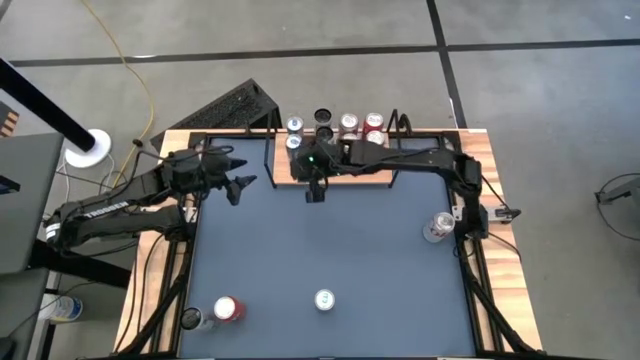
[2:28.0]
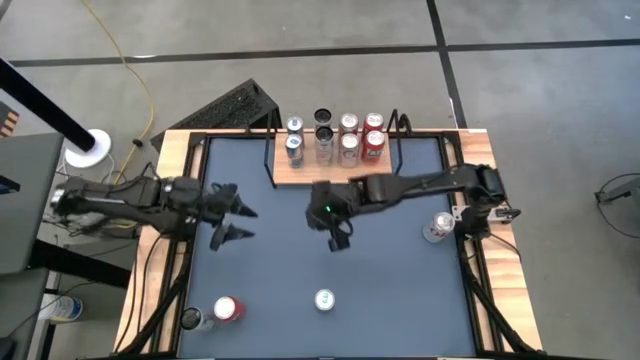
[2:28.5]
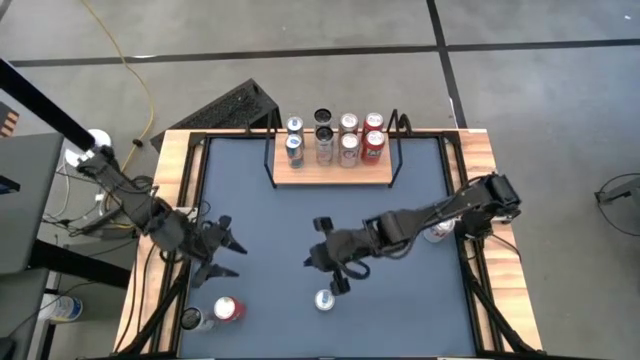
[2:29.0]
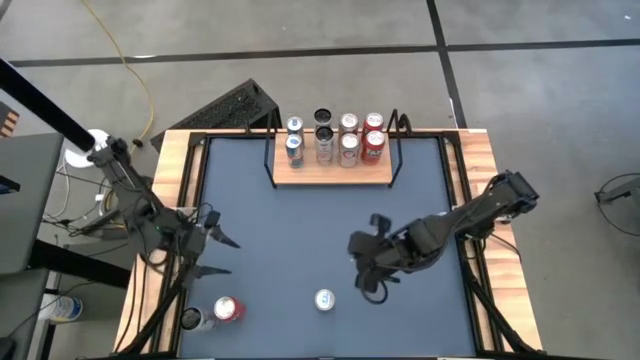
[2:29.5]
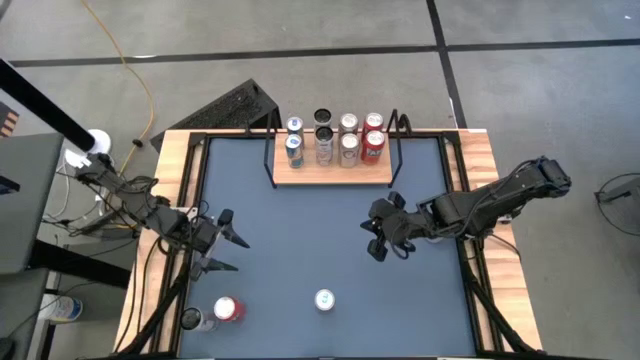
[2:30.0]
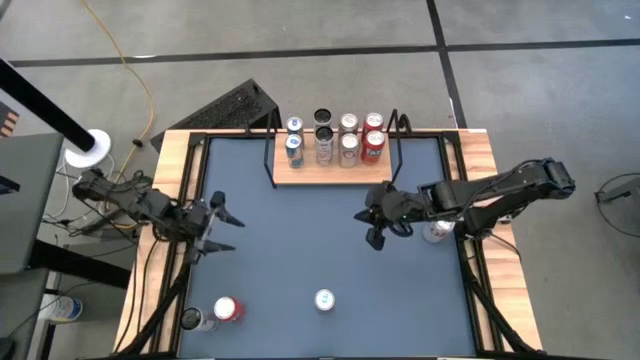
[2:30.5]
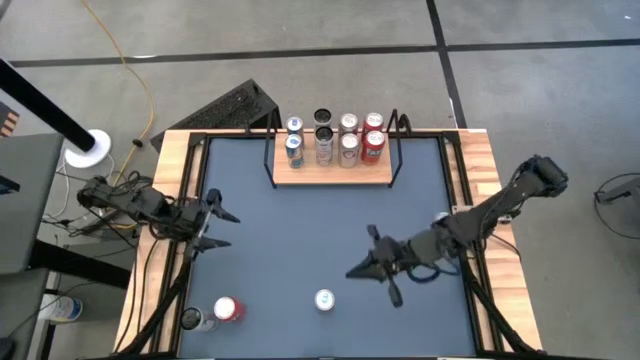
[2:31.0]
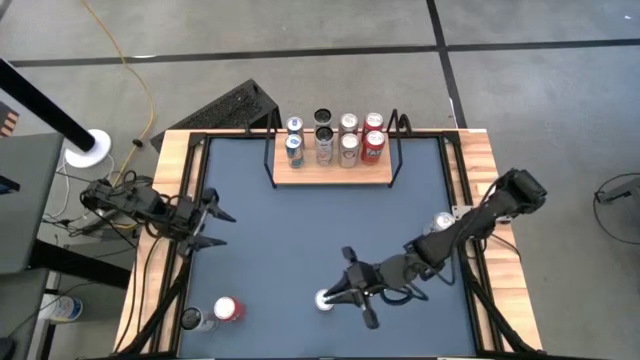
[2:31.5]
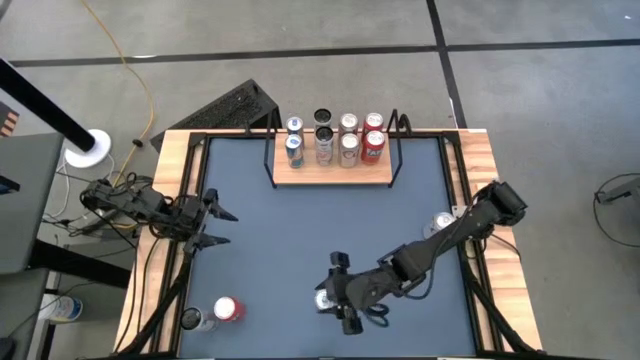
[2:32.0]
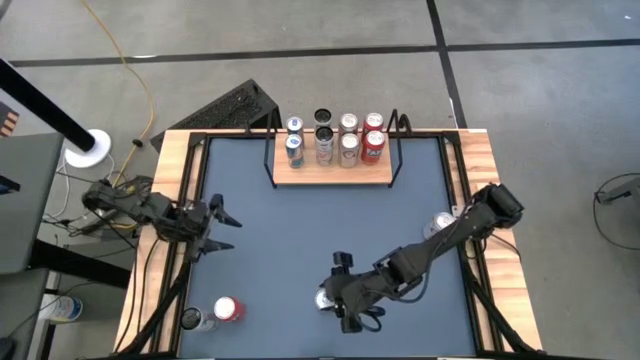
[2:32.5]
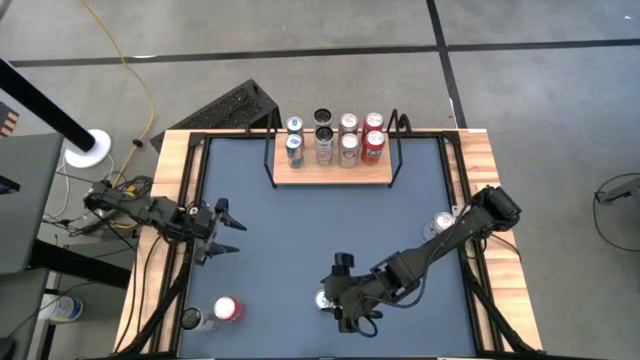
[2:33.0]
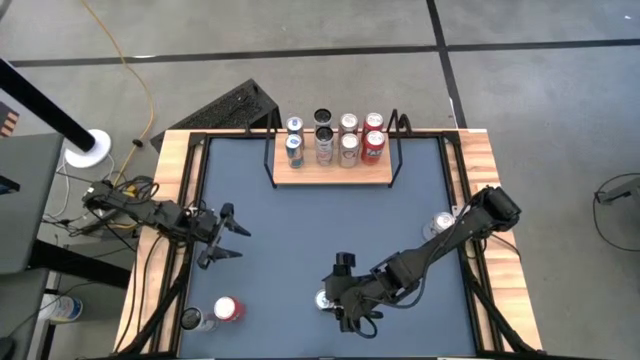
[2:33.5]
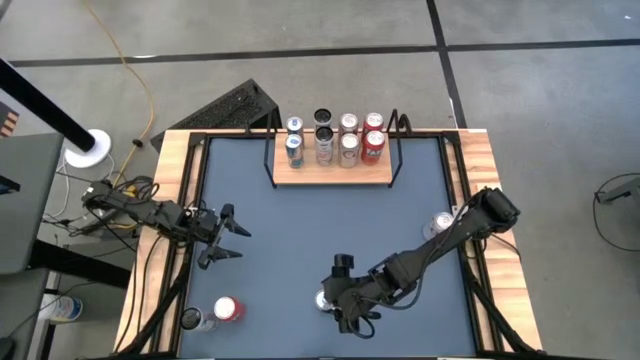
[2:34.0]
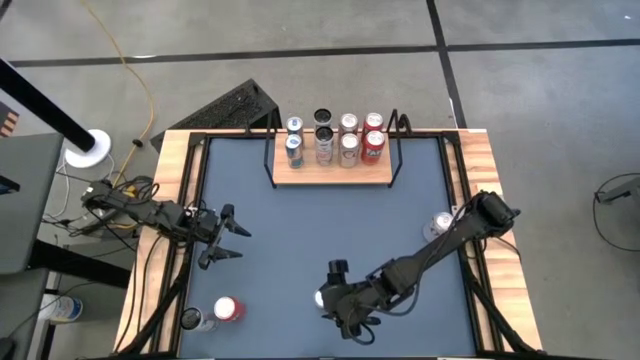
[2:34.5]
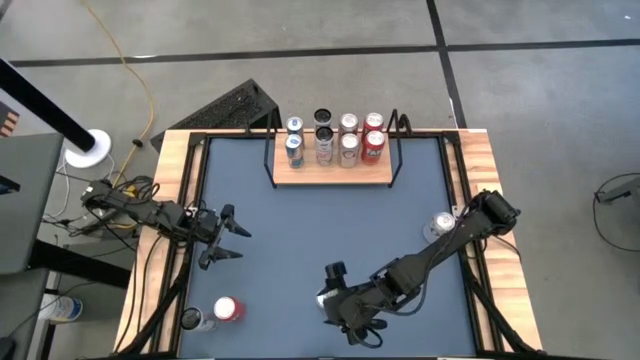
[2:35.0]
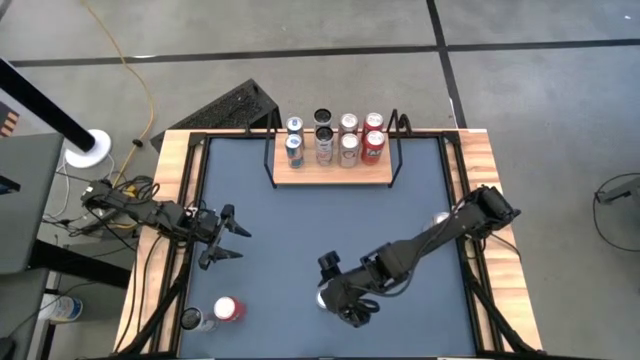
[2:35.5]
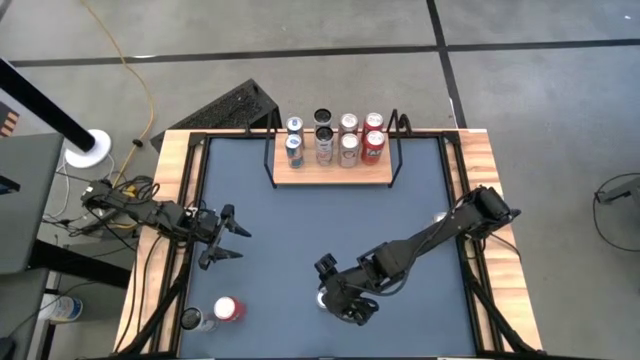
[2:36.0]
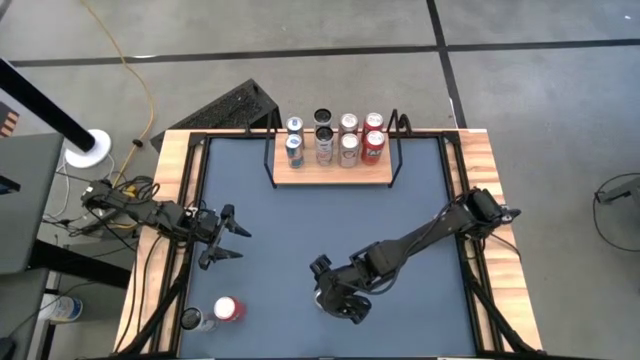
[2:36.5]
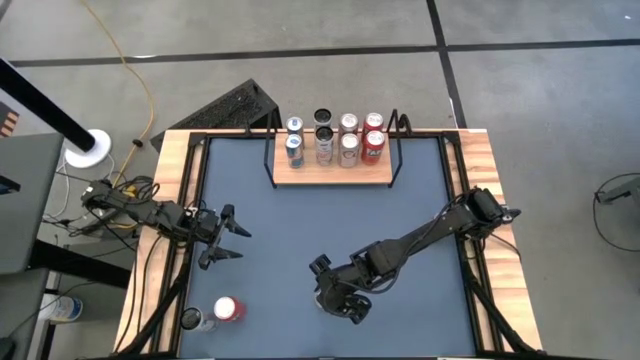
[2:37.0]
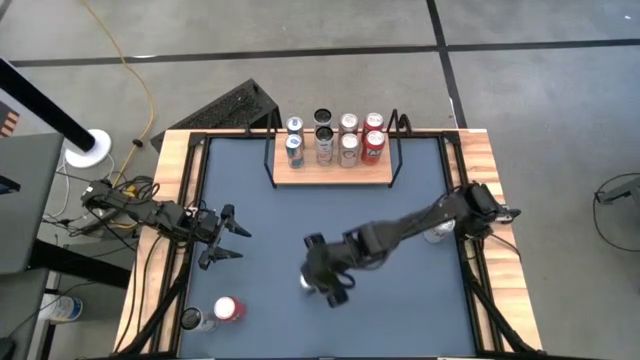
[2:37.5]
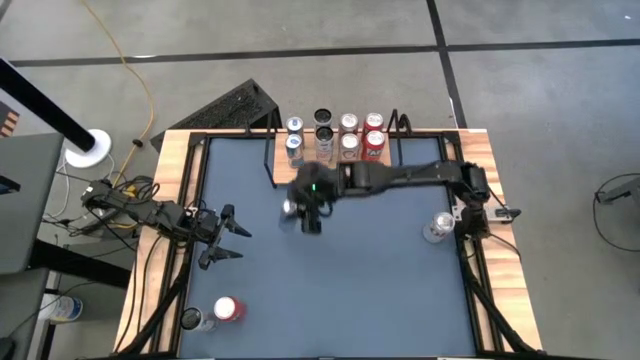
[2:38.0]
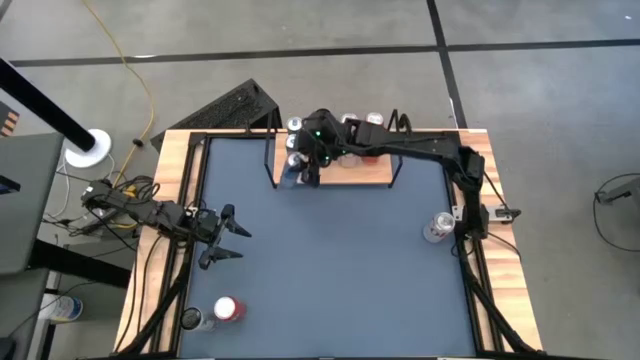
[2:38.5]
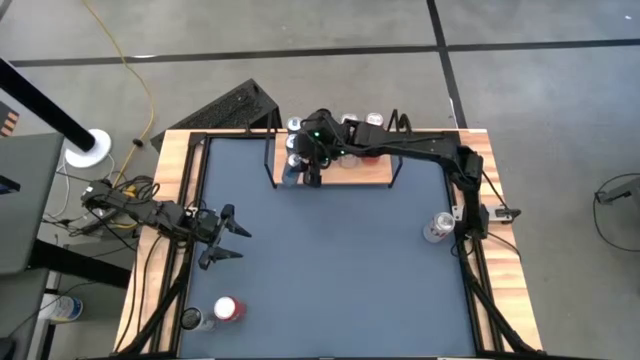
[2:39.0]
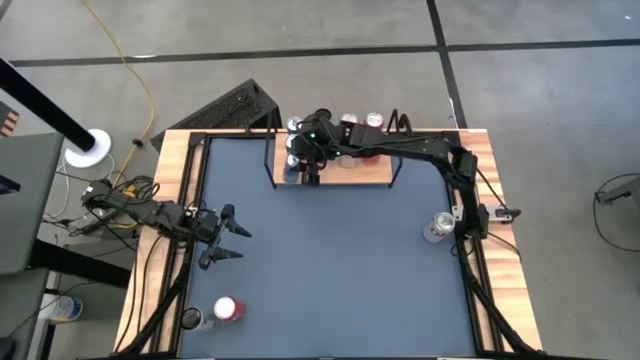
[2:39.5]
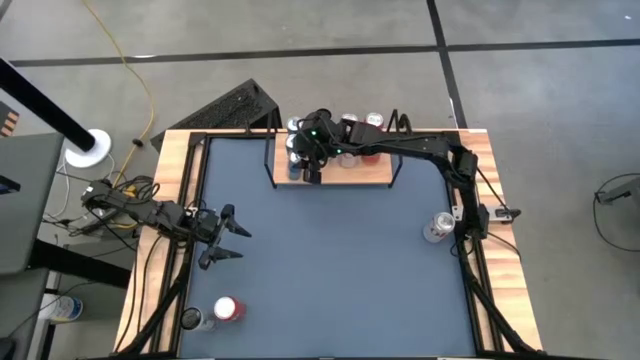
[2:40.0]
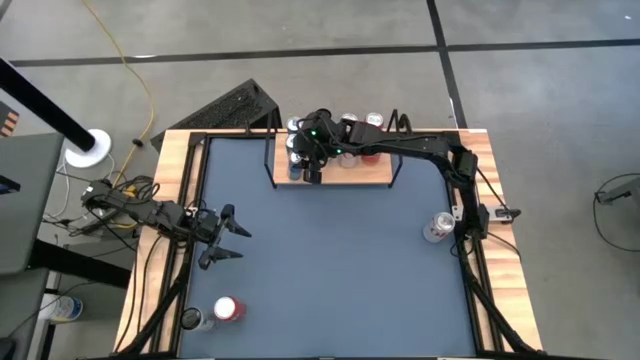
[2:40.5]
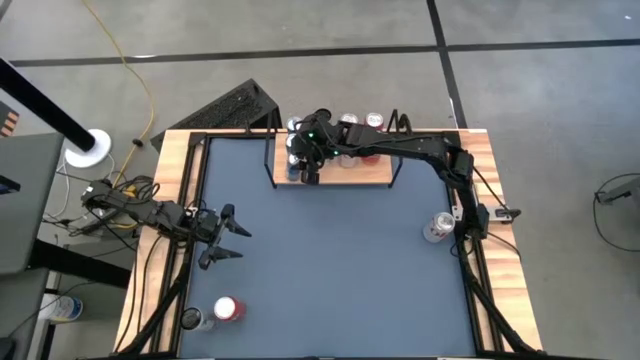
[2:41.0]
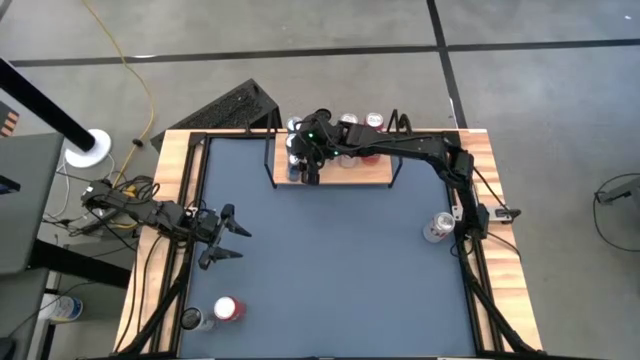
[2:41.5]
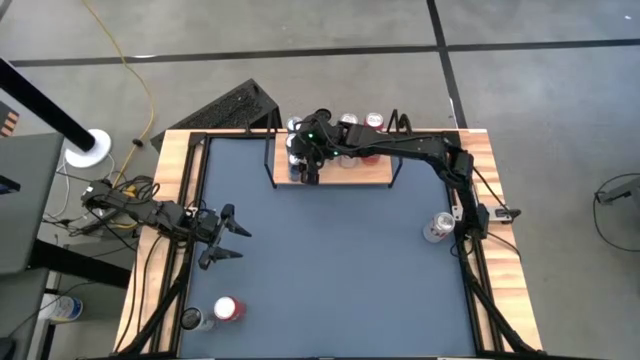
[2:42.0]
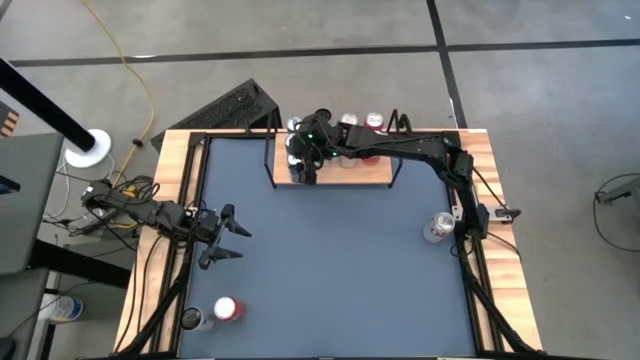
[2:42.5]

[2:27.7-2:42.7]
Task: Place canned beverage on shelf
Put the blue soda can on the shelf aligned with the other blue soda can

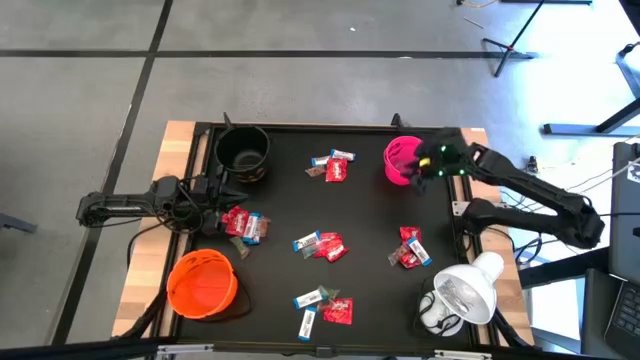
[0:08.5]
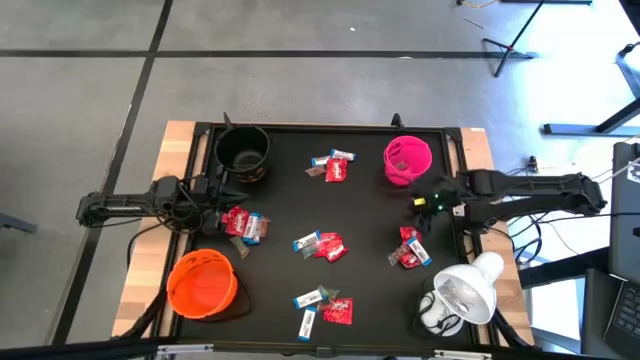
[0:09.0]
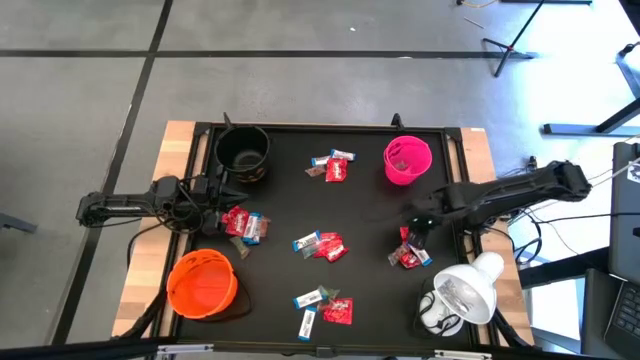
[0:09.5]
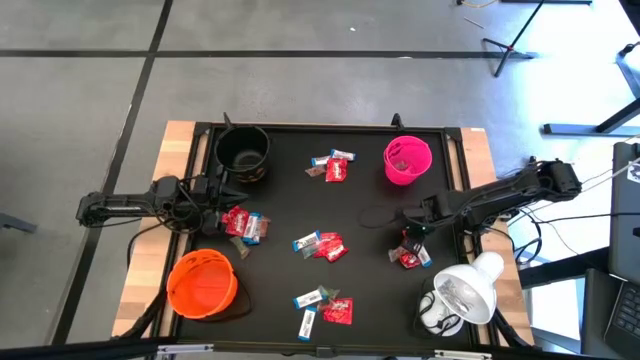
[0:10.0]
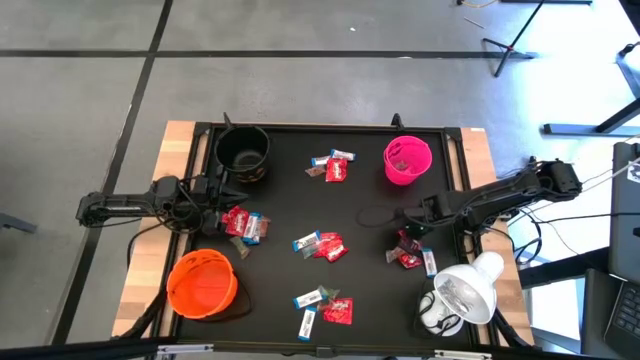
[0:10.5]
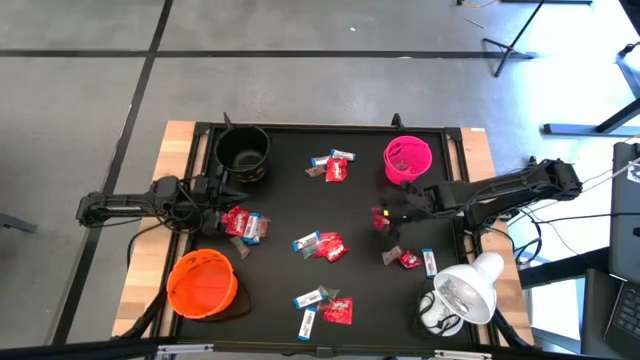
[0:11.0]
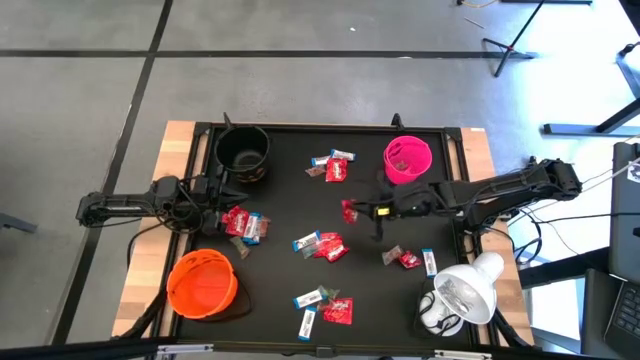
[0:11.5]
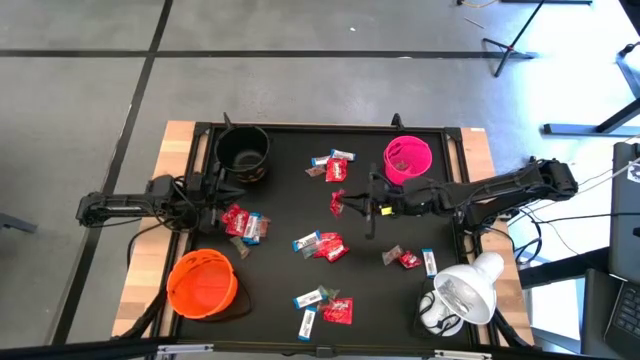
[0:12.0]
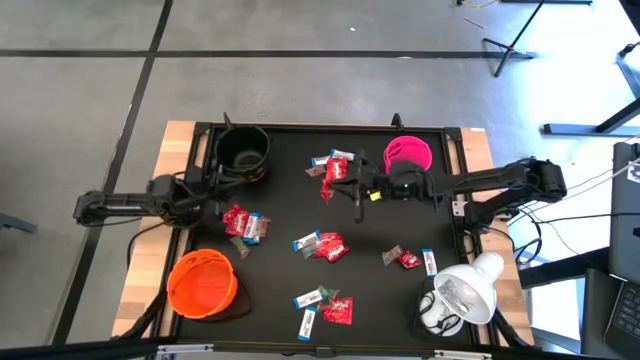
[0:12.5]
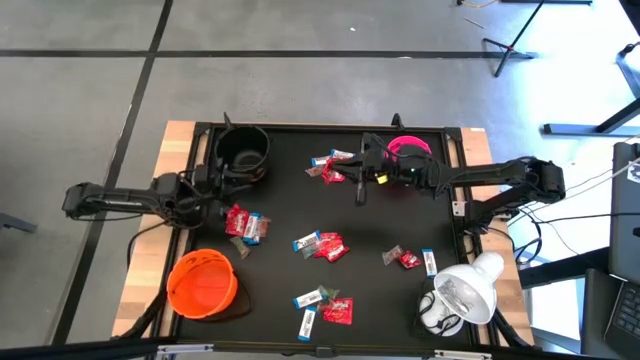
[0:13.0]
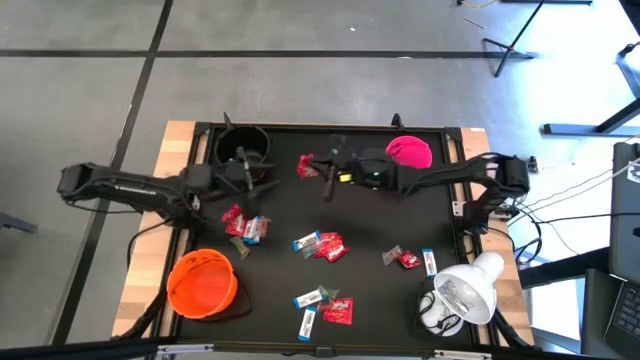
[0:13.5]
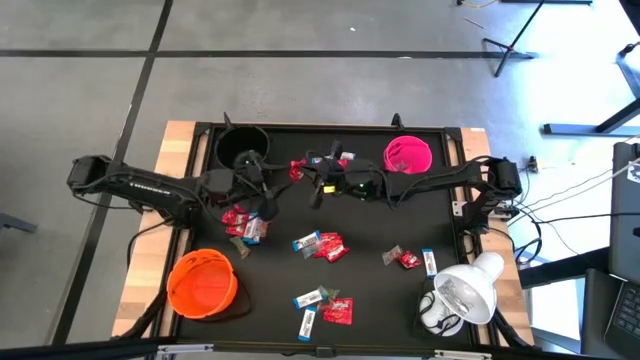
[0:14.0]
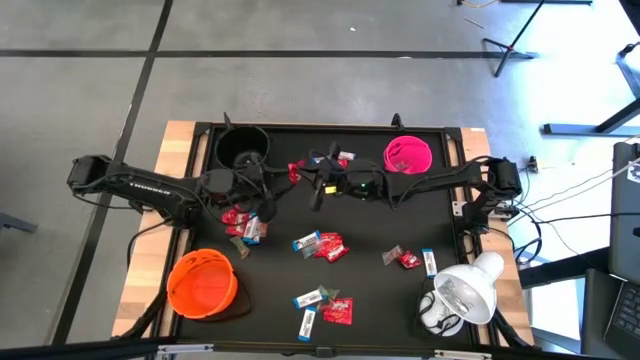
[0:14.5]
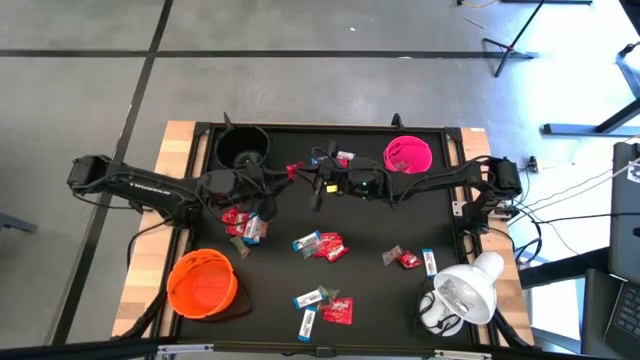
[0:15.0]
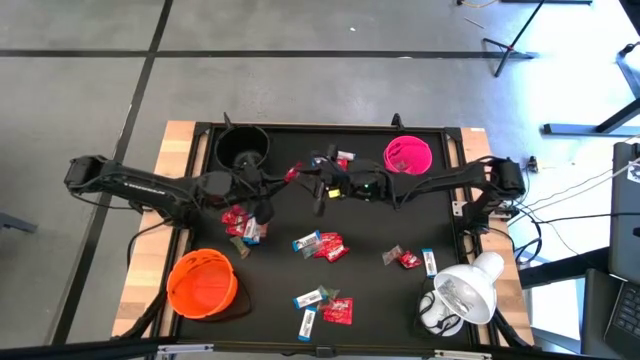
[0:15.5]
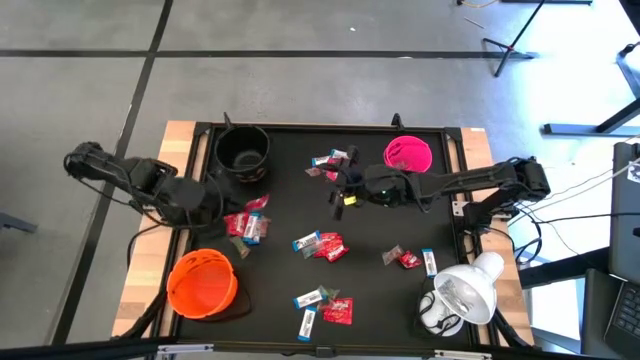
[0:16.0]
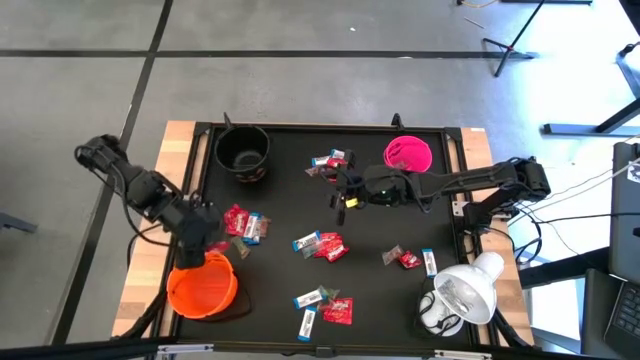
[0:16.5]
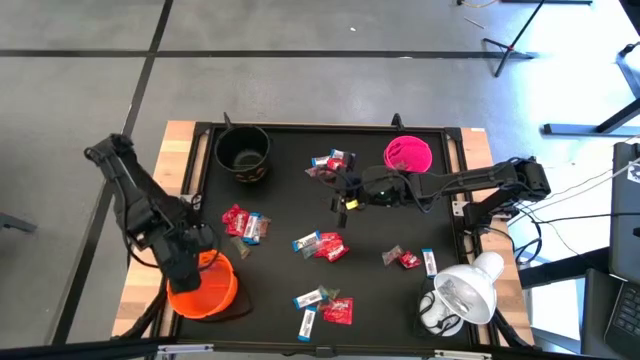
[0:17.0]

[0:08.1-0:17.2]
Task: Sort candy
Put the red candy into the orange bucket
